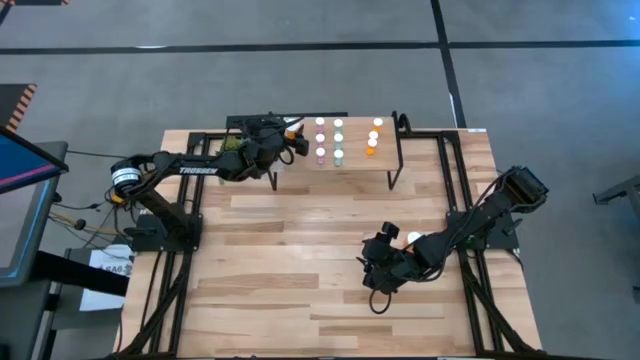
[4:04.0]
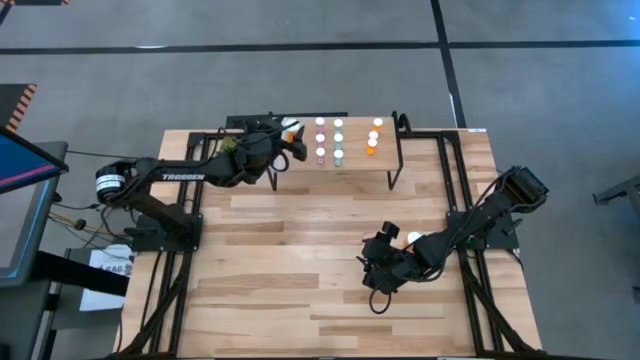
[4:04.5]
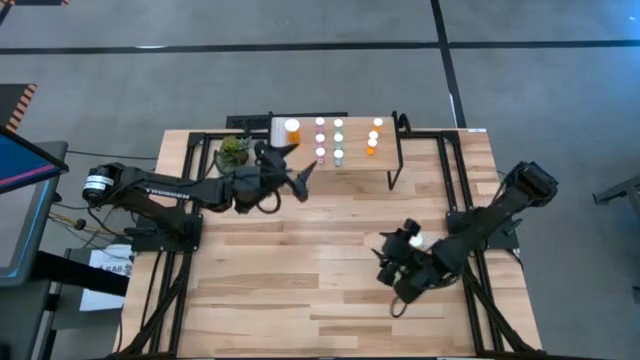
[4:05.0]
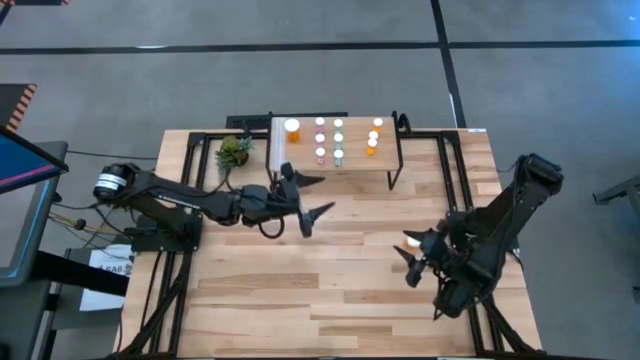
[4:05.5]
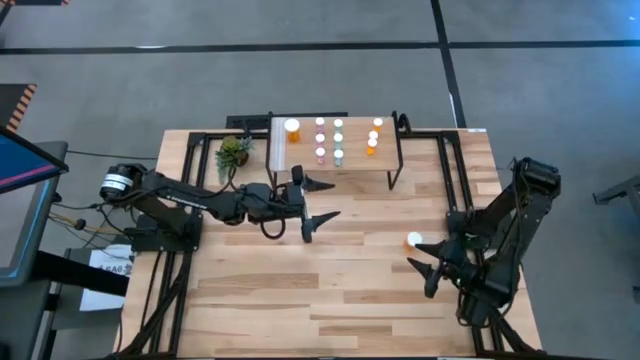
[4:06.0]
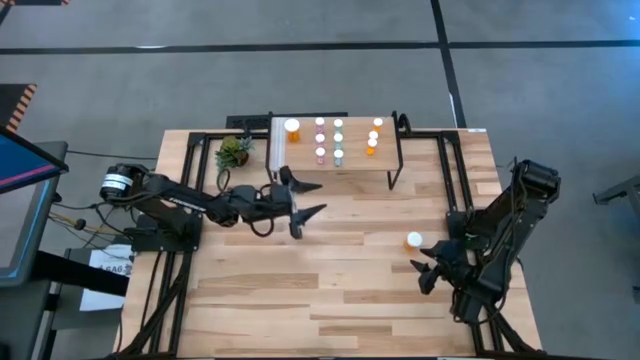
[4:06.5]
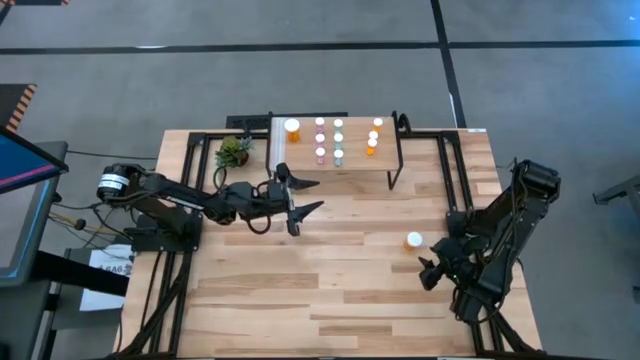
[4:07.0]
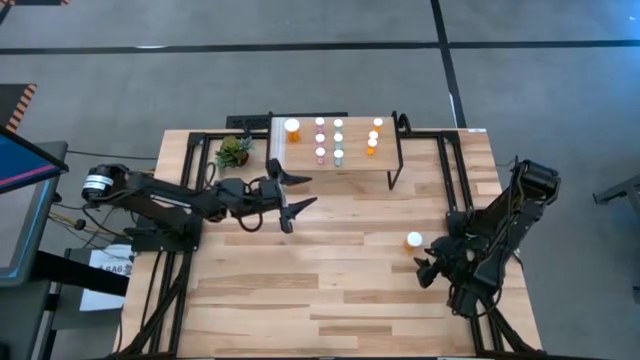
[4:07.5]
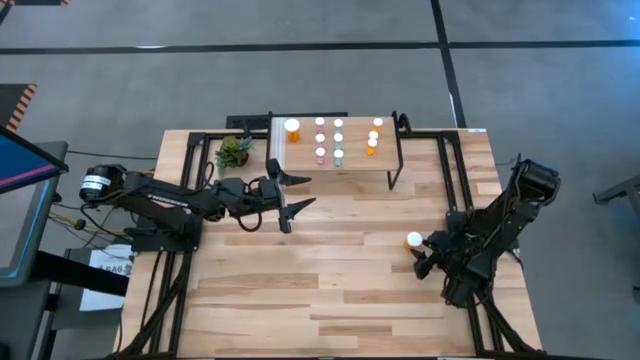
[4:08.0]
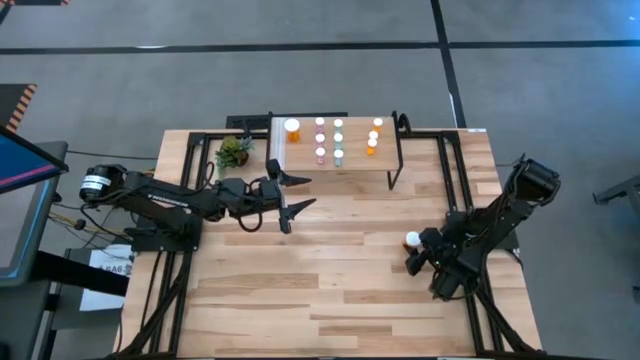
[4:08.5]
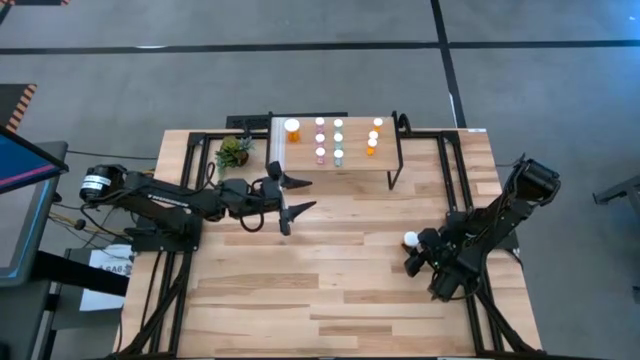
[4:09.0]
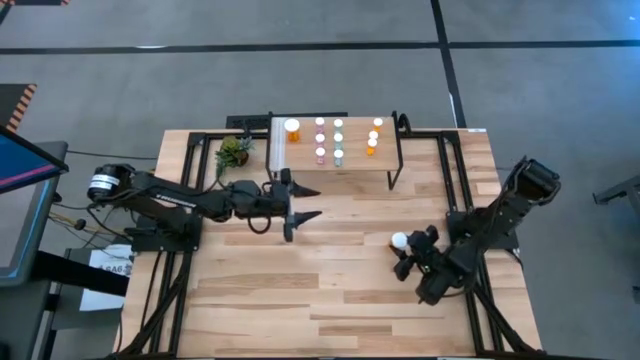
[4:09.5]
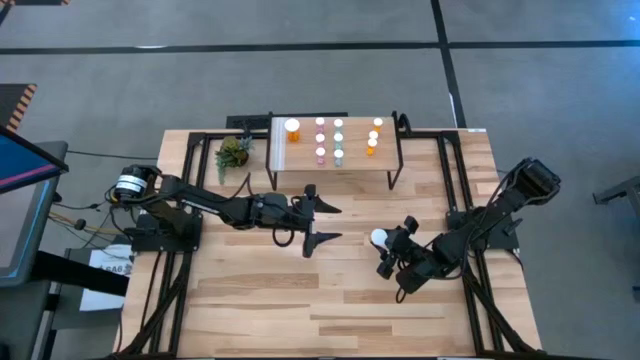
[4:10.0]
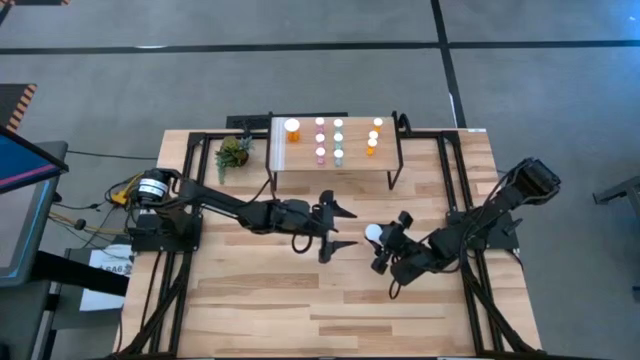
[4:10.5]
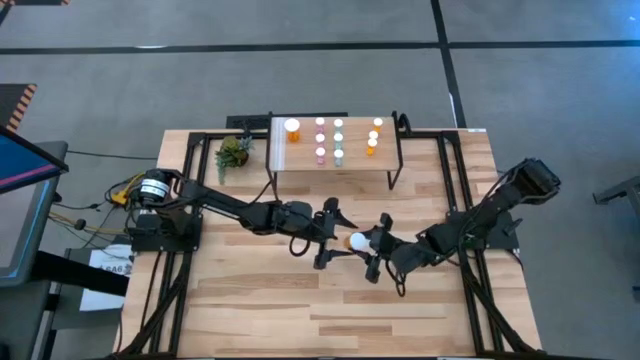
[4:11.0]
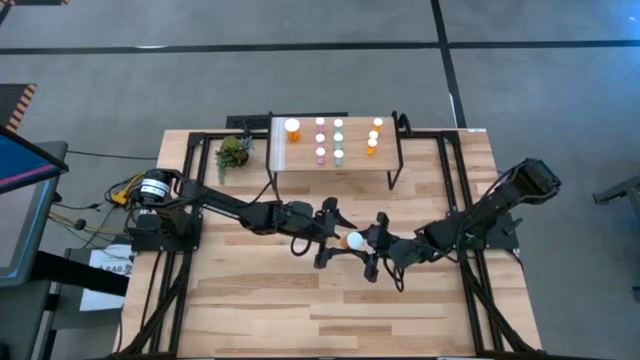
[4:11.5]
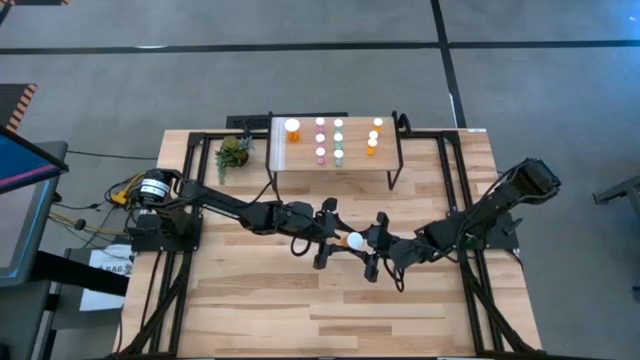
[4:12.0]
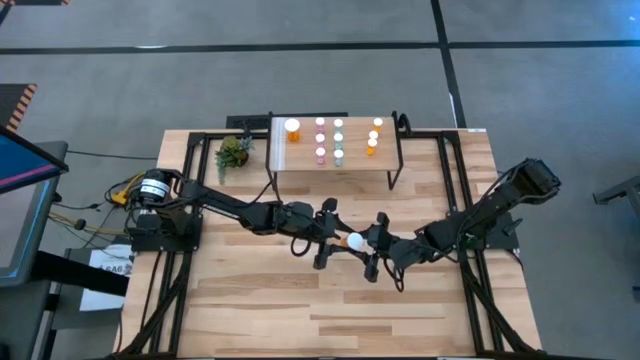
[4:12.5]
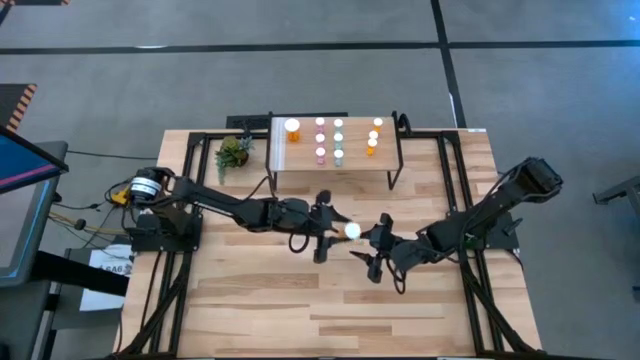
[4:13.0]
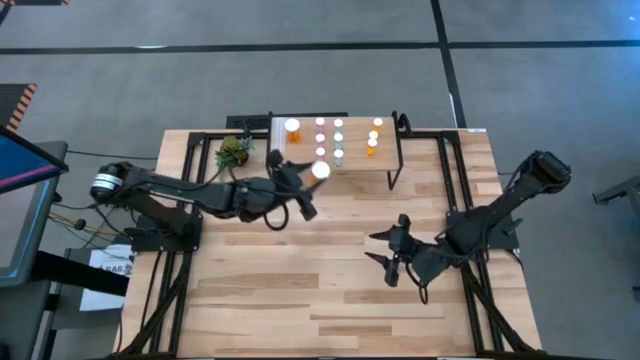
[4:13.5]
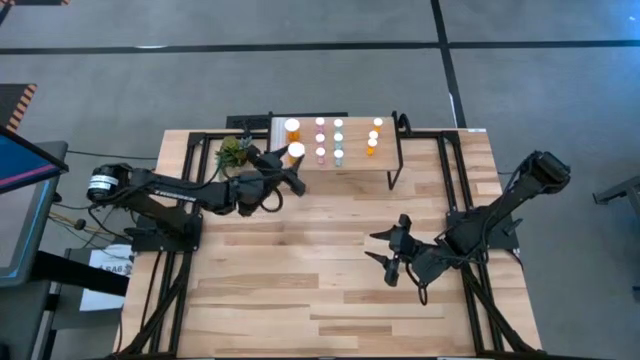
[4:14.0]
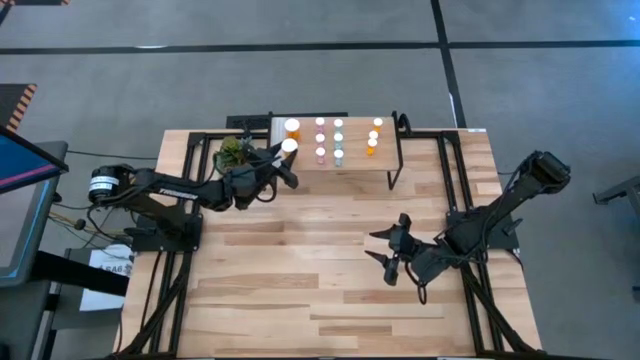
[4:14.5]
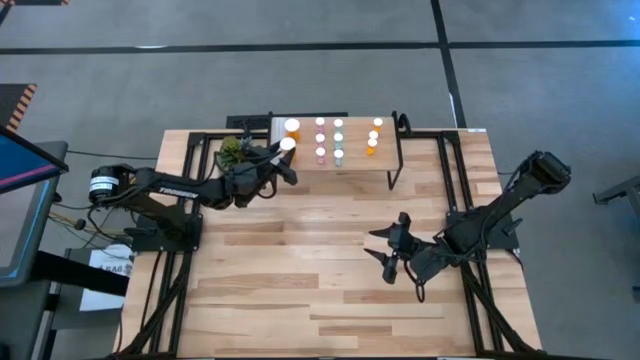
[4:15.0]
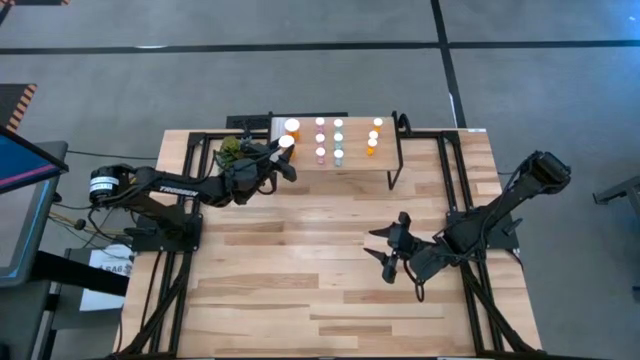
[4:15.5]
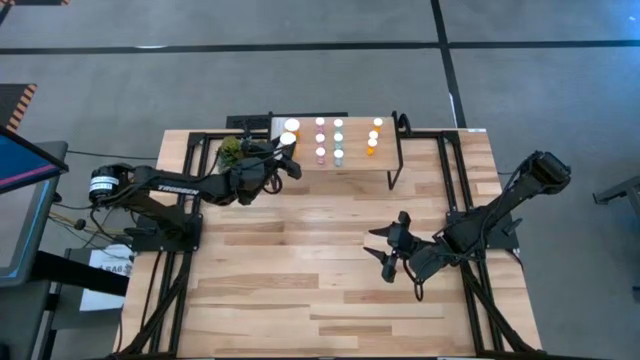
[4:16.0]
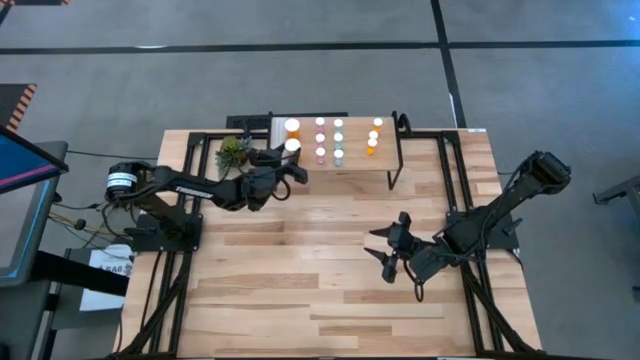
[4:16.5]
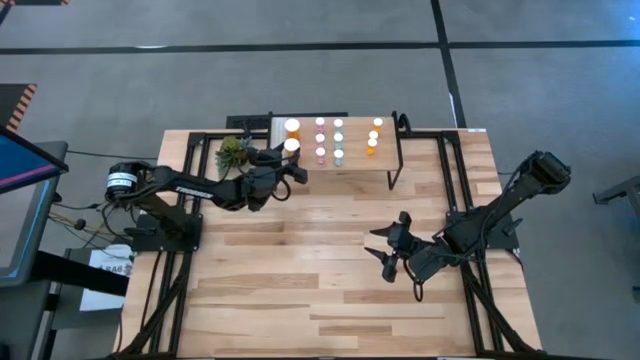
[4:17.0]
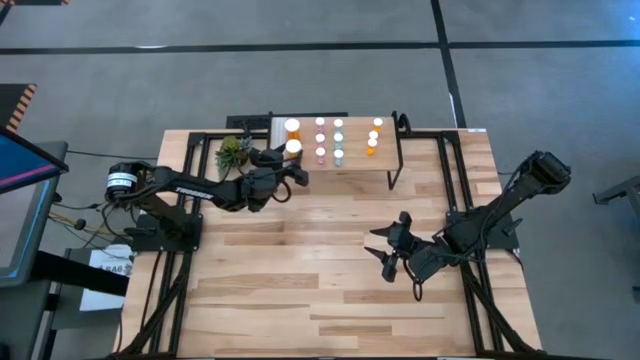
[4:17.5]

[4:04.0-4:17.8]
Task: Pick and place medicine bottles onto shelf by color
Put the big orange pill bottle on the shelf aligned with the other big orange pill bottle

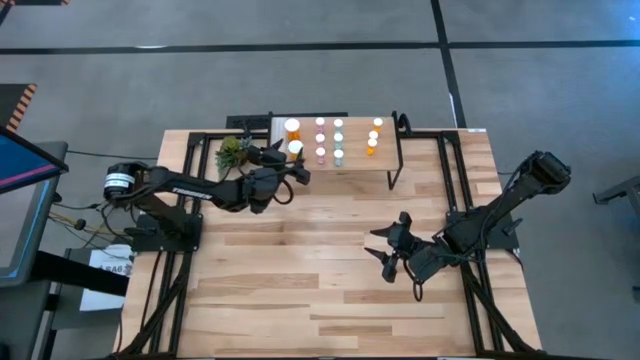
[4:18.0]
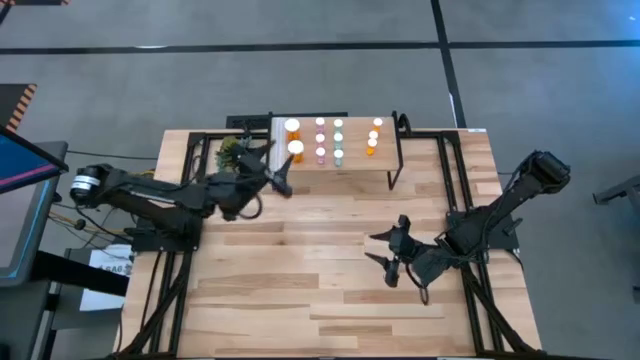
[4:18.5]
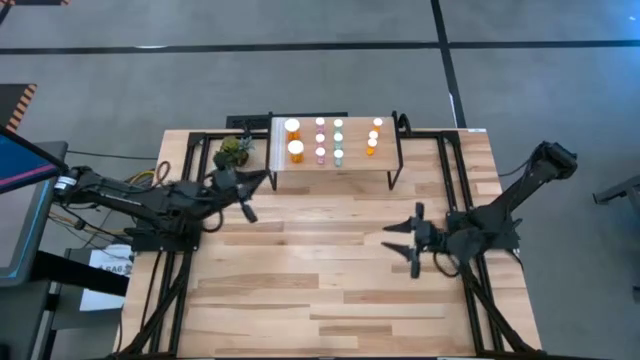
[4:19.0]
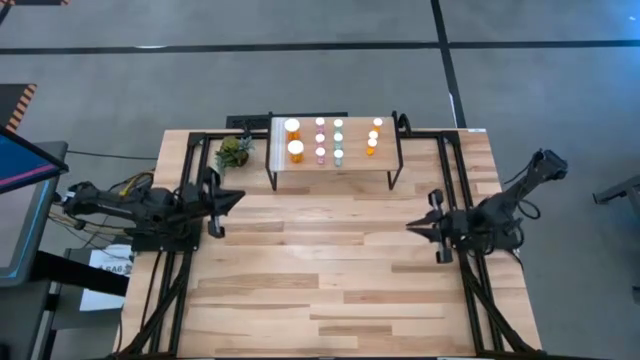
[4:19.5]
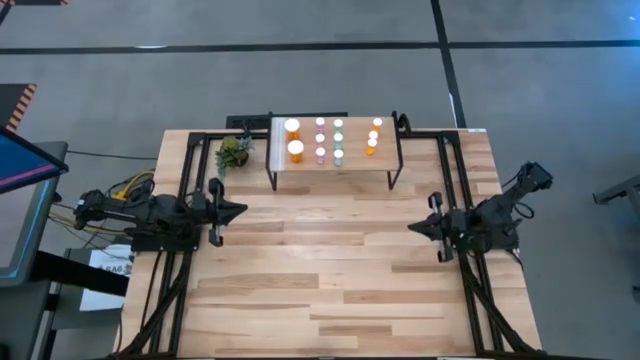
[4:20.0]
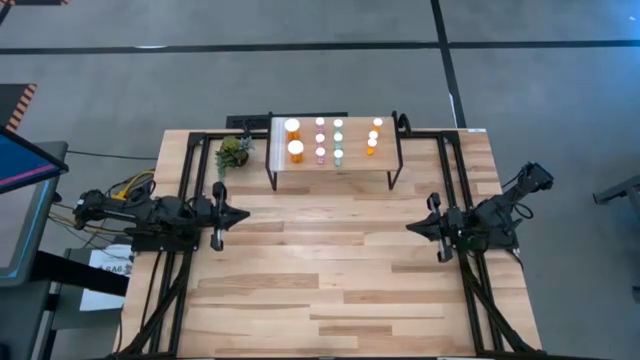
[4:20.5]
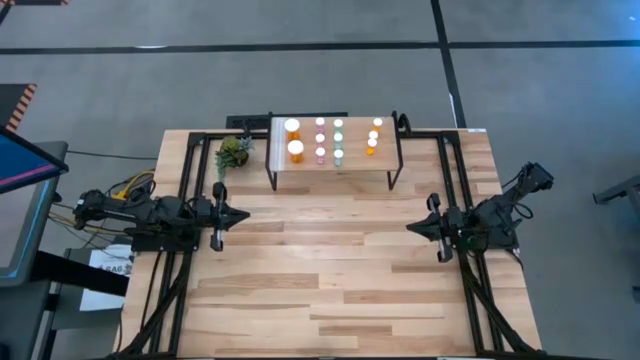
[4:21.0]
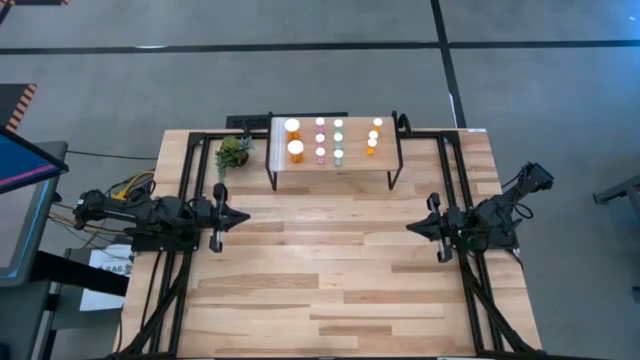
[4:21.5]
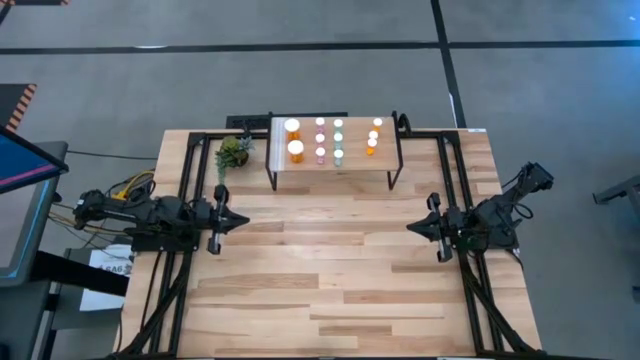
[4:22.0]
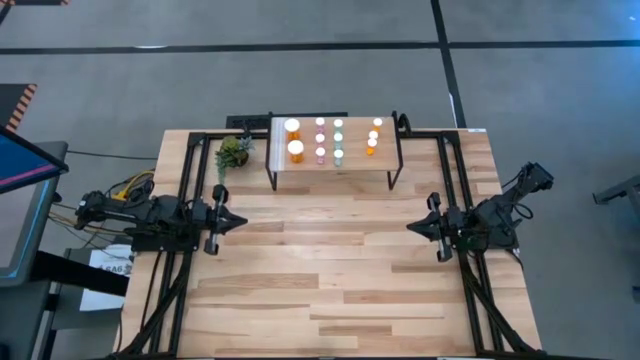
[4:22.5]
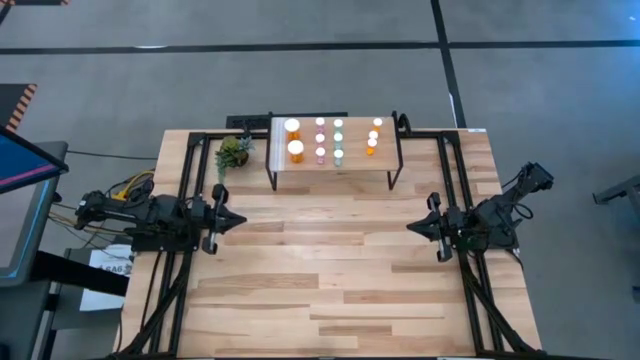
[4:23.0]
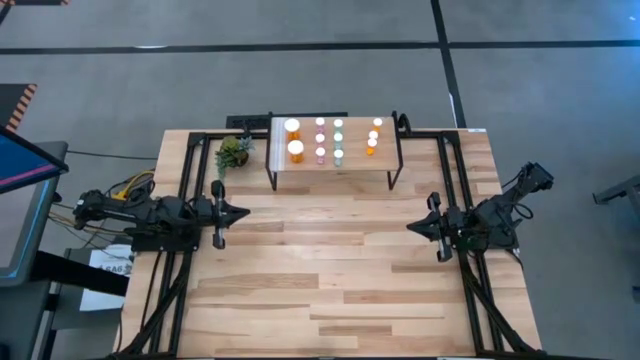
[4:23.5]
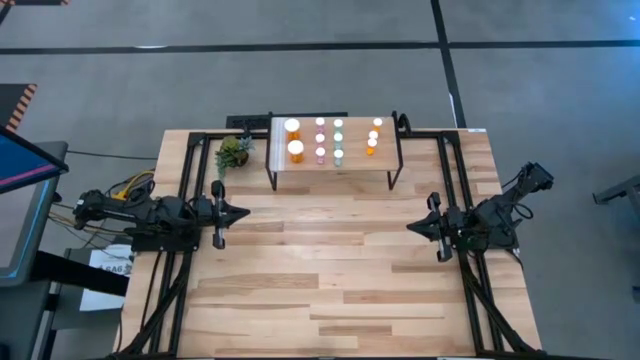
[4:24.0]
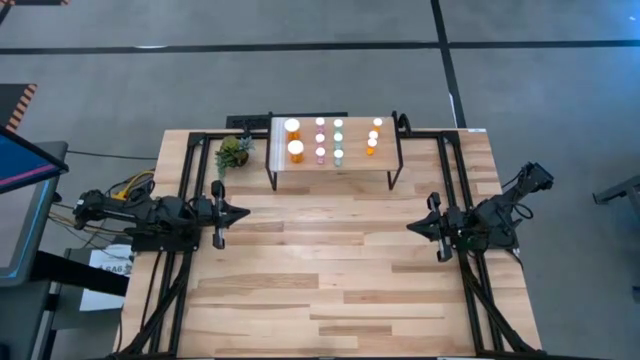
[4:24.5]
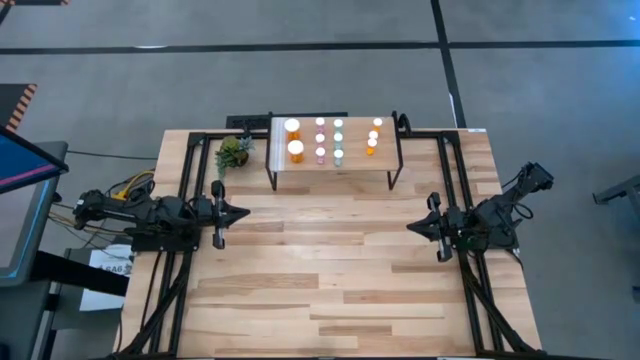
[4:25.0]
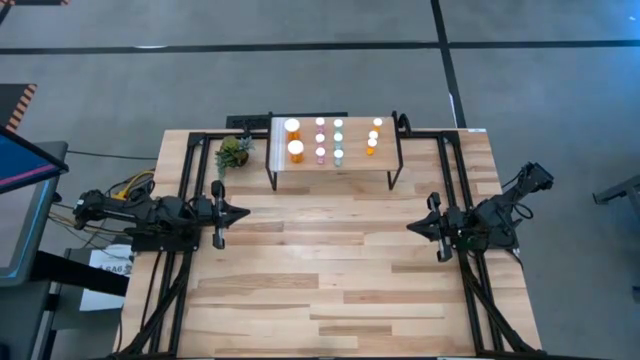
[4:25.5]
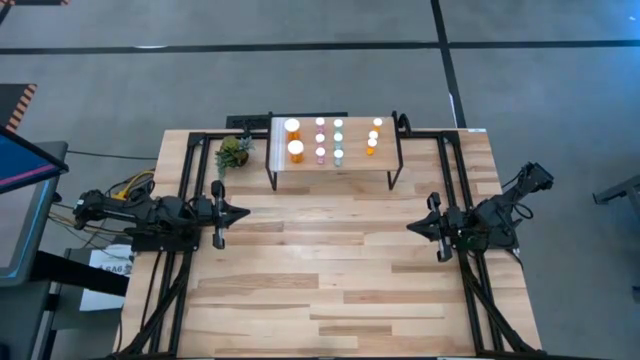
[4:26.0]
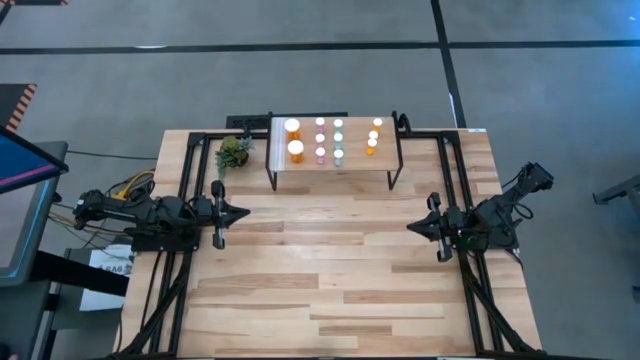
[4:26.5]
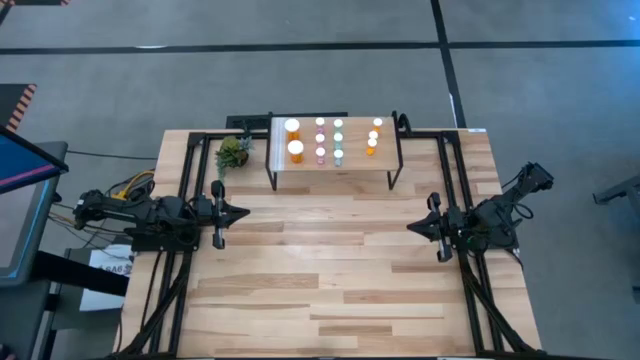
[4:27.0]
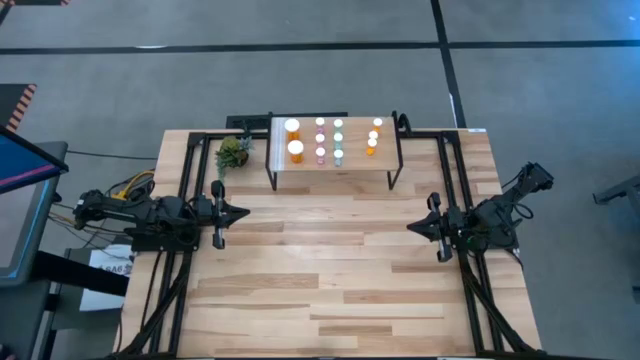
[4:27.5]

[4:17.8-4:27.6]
Return to Home Position
